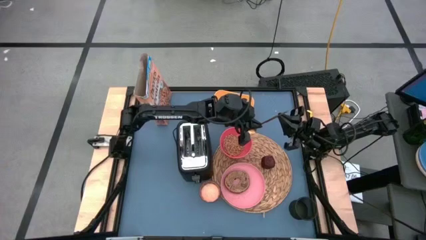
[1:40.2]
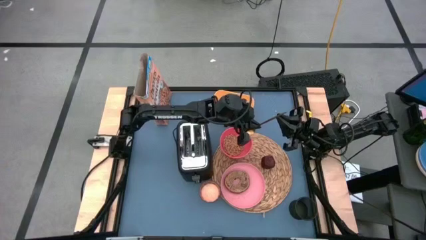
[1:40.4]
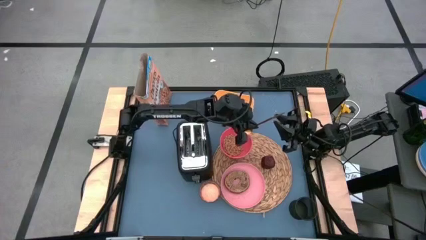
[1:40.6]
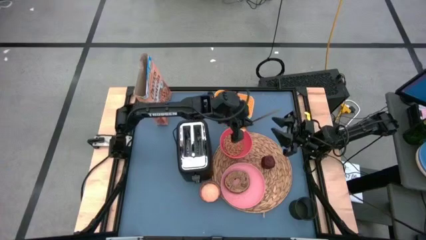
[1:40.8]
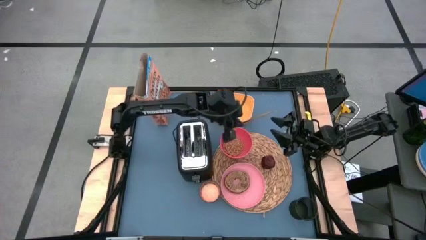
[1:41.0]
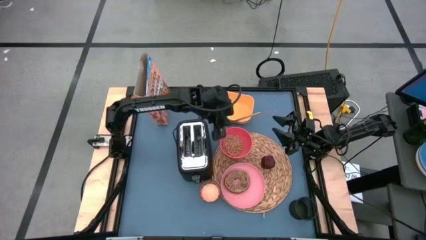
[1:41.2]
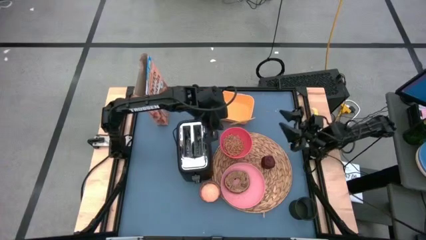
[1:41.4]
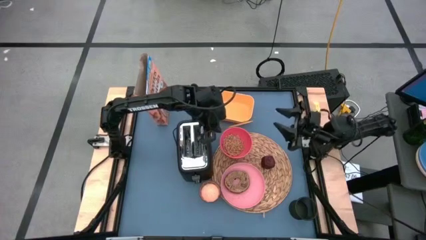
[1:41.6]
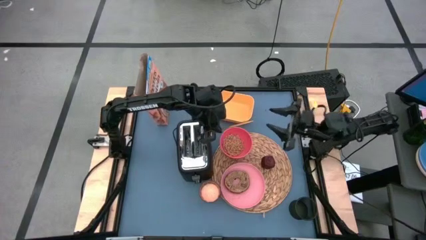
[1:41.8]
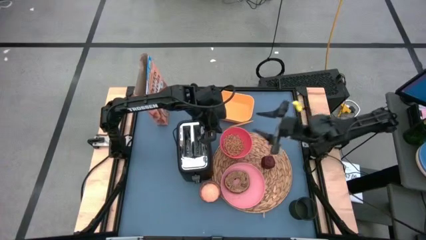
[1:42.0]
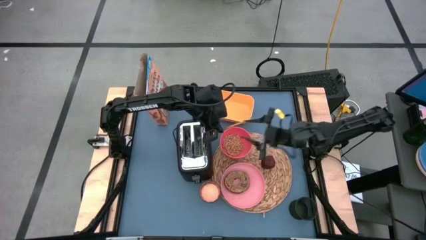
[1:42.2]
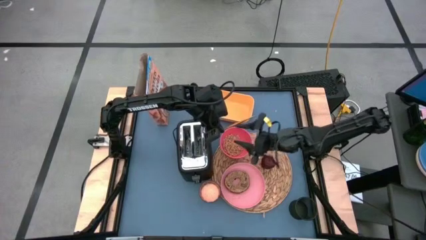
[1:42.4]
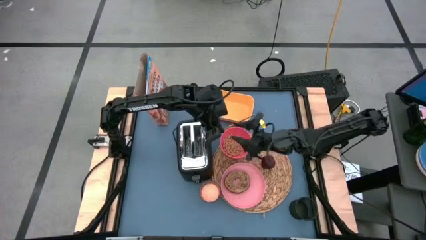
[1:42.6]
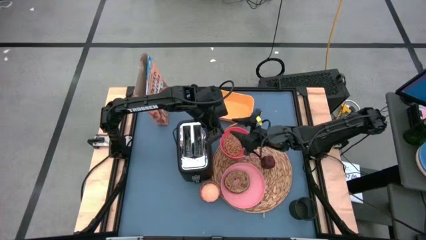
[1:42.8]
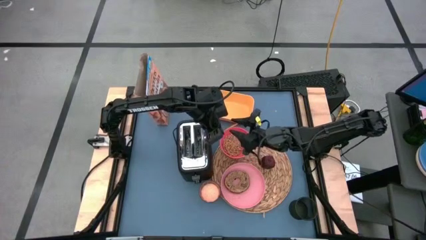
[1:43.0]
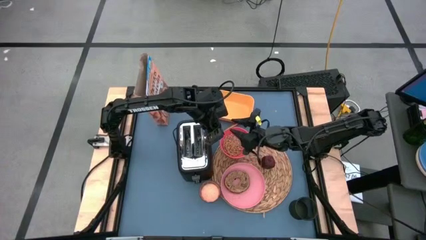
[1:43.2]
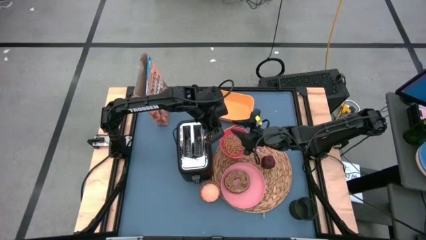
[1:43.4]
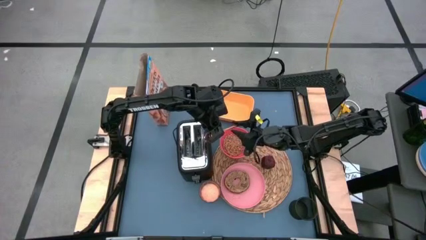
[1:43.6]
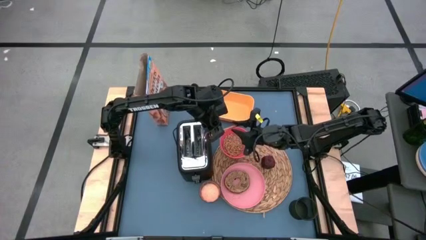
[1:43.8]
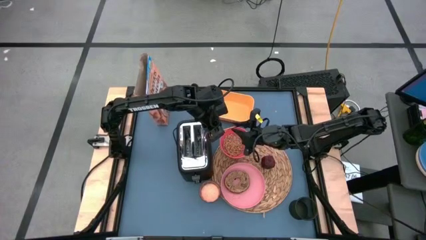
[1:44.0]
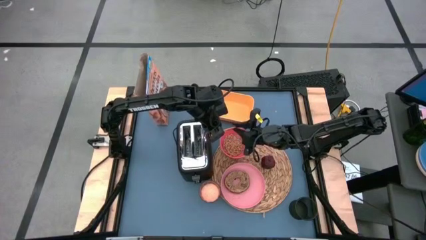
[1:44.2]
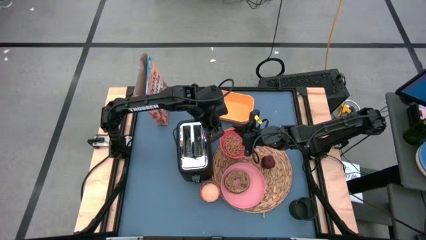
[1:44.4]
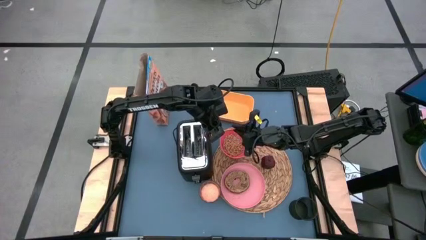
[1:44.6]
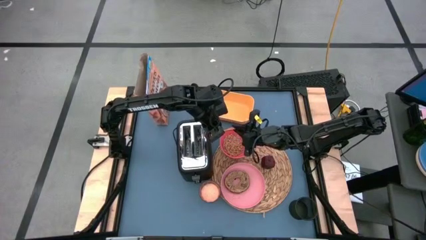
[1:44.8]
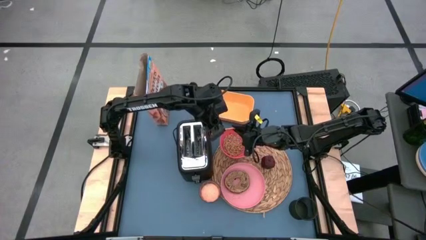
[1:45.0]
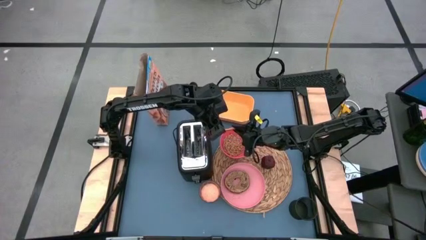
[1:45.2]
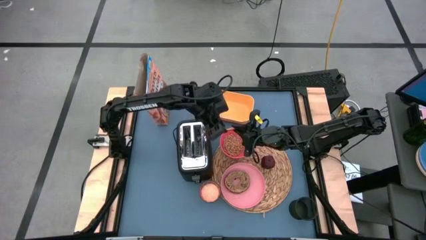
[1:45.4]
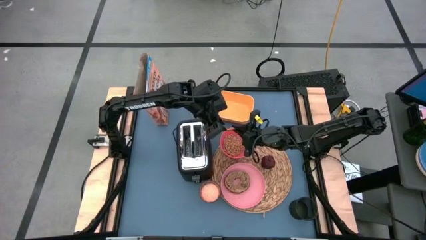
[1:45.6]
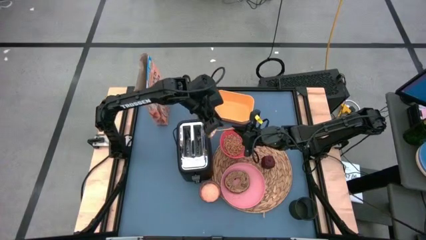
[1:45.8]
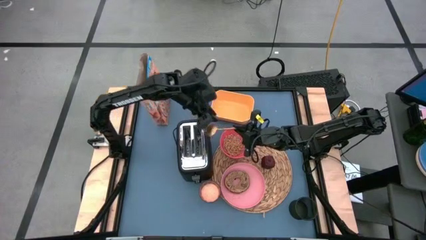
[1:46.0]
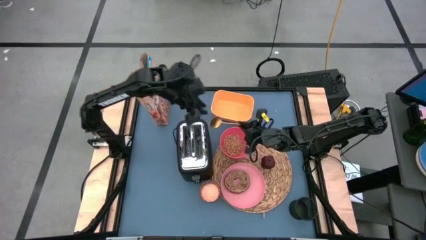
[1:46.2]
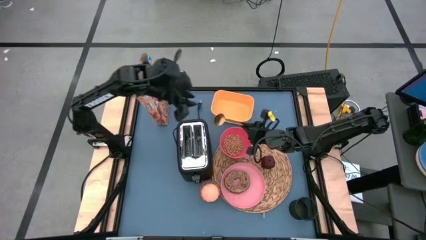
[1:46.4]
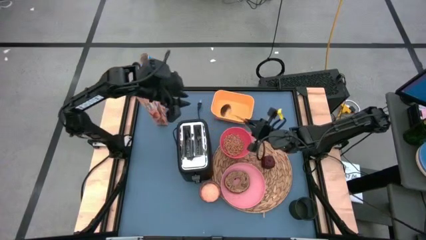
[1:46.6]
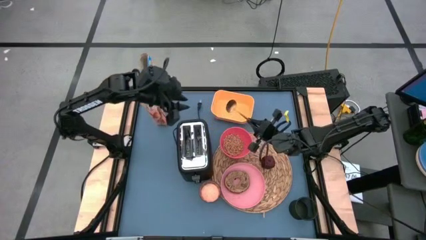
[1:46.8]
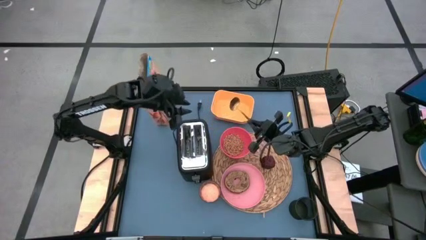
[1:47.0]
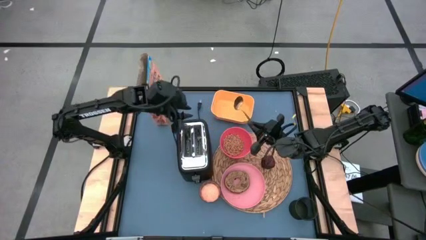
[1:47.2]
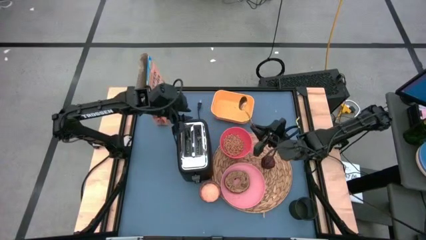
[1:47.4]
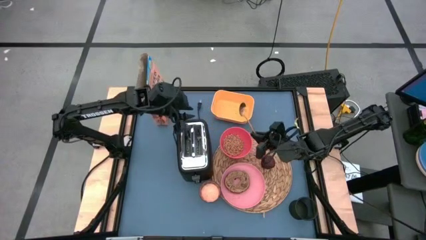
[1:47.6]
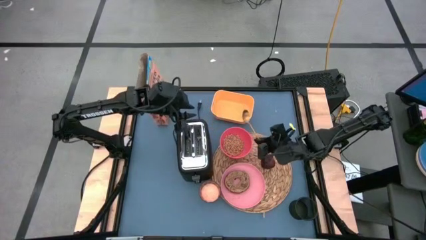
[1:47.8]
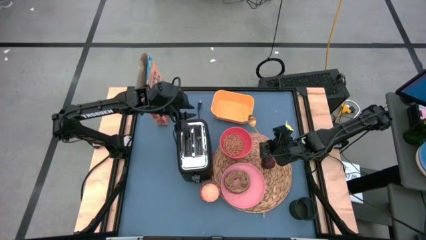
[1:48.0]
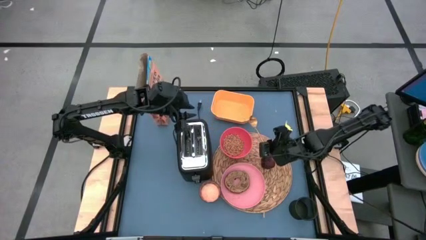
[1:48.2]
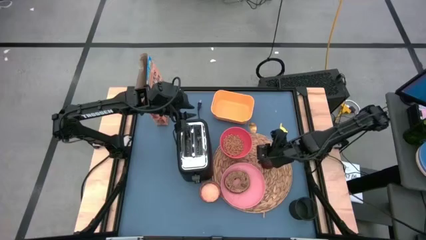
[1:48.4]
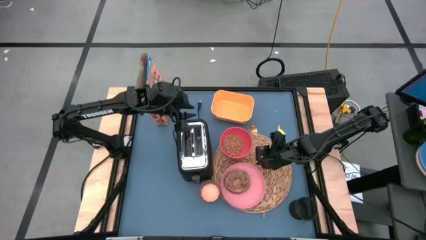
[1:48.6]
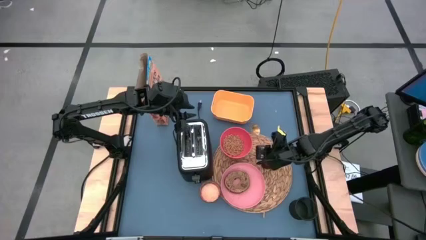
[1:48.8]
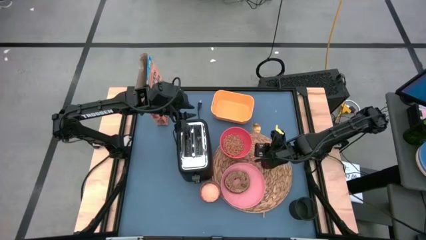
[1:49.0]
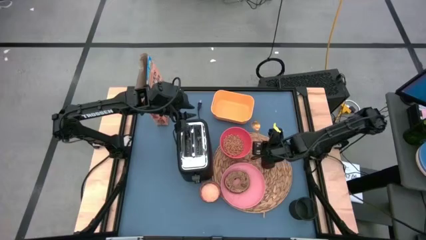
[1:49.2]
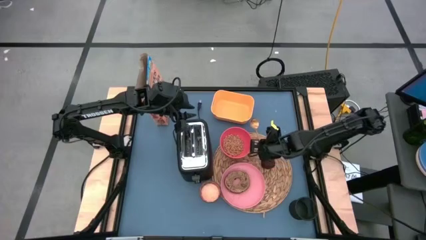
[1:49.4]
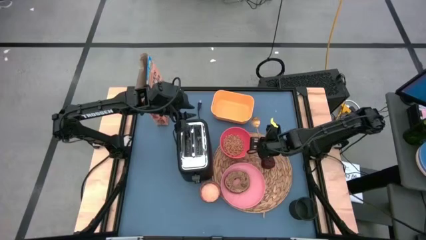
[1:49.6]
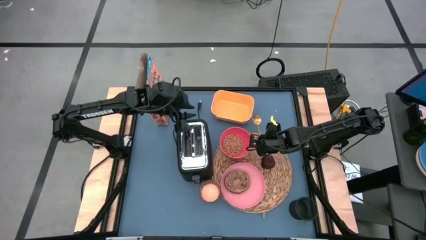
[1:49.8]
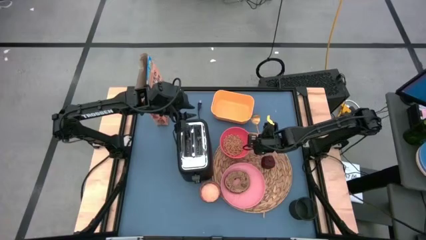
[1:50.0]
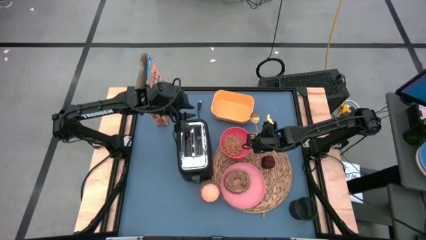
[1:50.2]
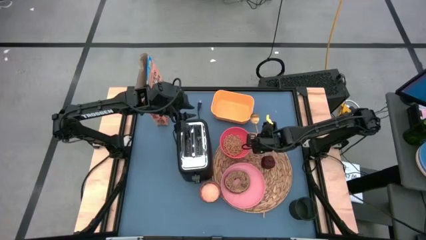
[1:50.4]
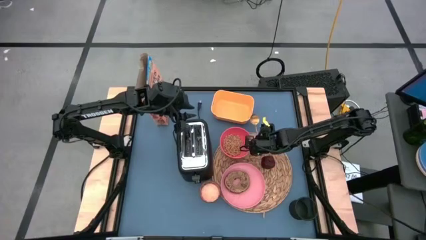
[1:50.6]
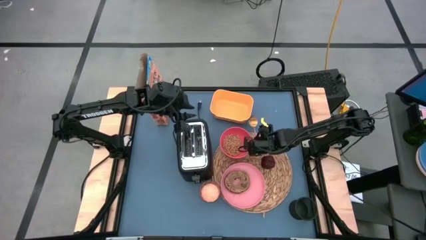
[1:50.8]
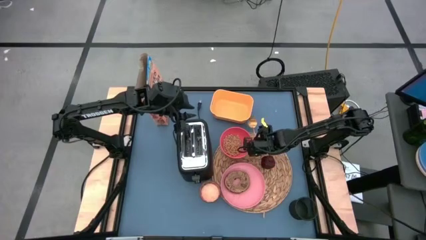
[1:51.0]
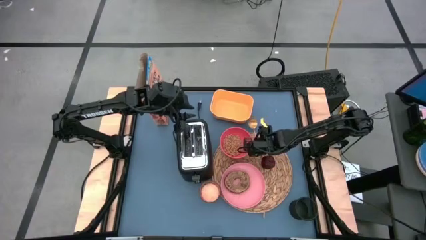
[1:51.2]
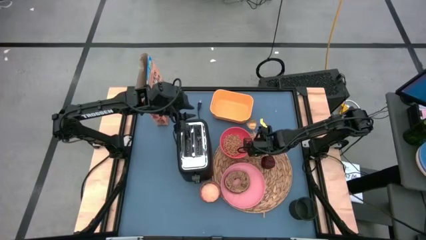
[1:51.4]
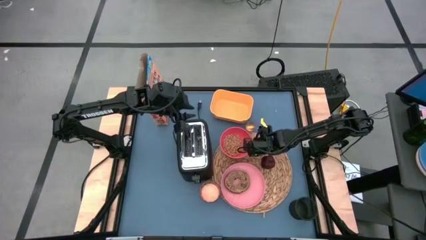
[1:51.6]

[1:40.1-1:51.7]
Task: Arrange a breakfast setting
Put the gold spoon on the table mat
